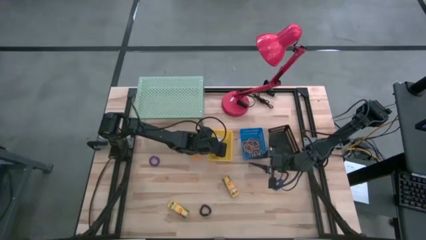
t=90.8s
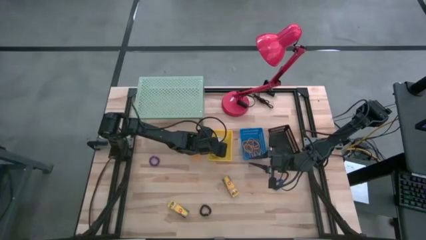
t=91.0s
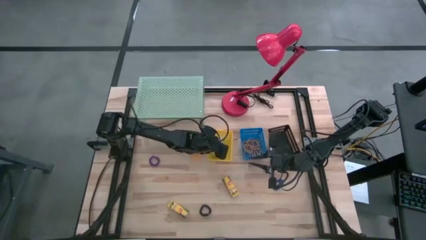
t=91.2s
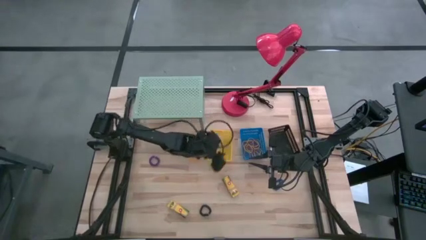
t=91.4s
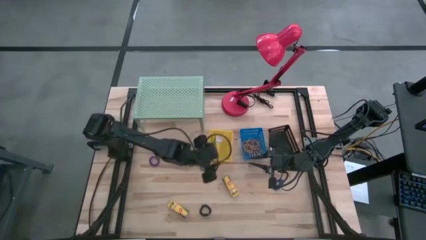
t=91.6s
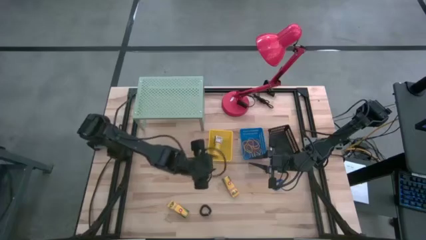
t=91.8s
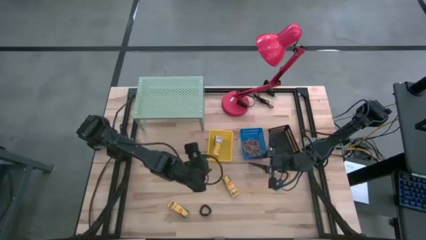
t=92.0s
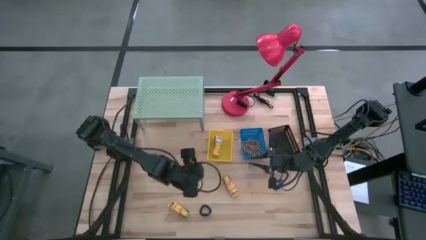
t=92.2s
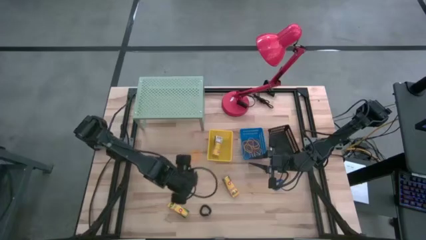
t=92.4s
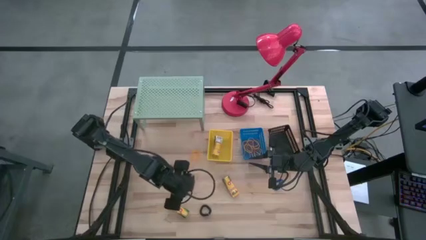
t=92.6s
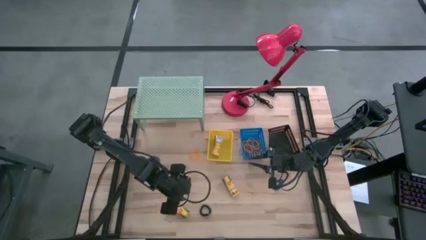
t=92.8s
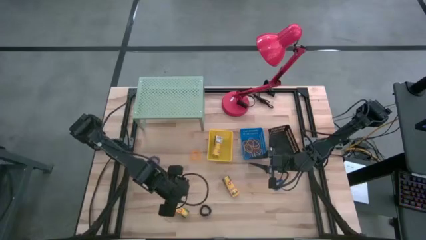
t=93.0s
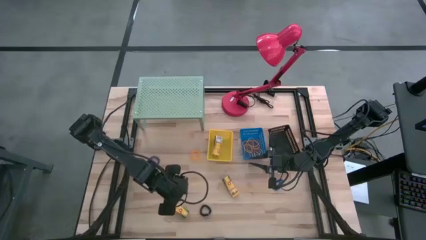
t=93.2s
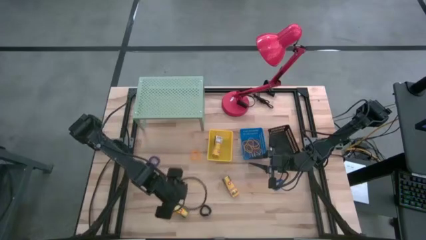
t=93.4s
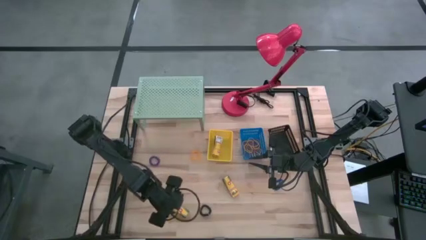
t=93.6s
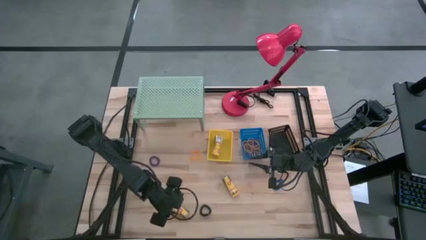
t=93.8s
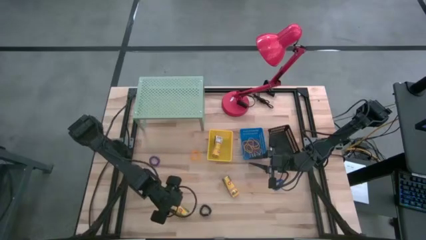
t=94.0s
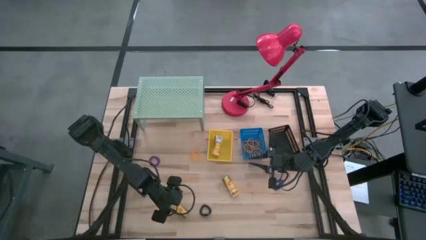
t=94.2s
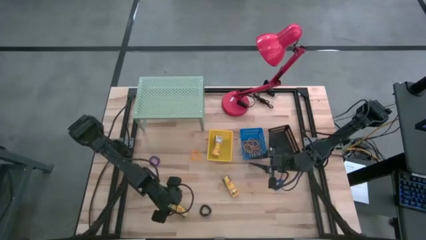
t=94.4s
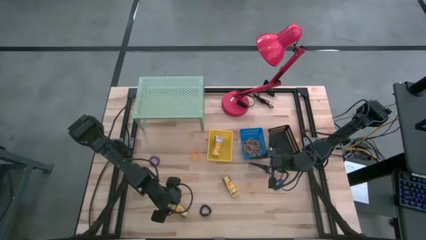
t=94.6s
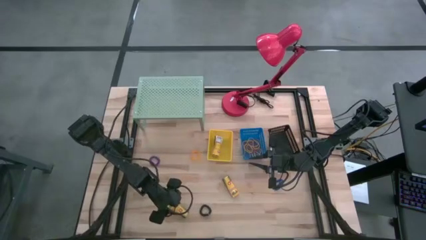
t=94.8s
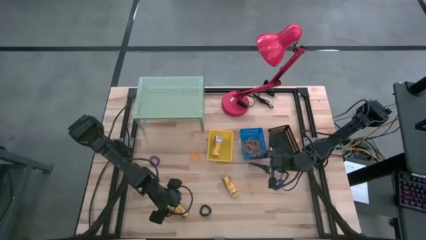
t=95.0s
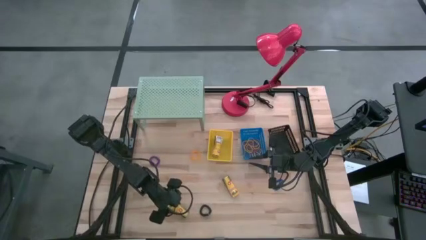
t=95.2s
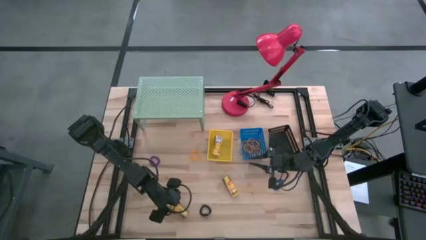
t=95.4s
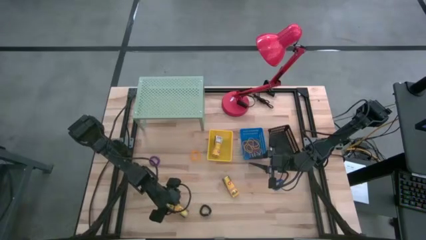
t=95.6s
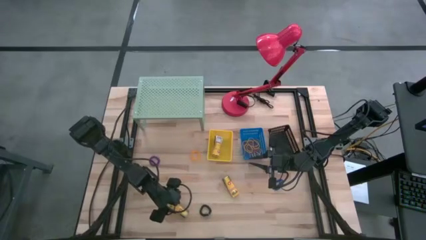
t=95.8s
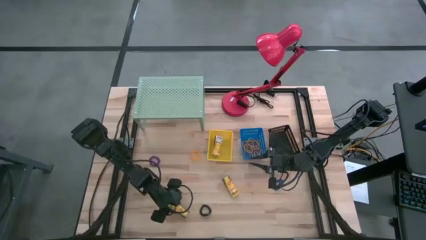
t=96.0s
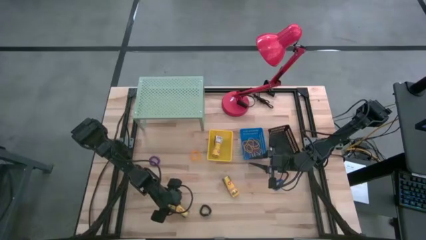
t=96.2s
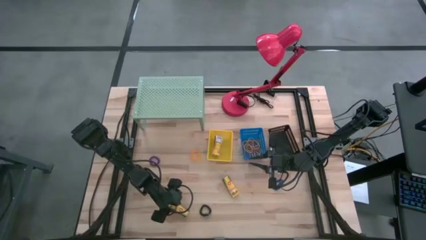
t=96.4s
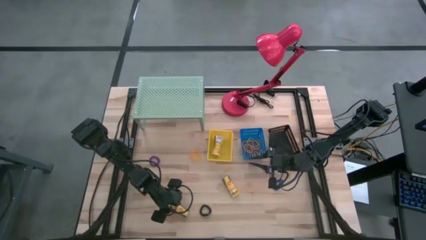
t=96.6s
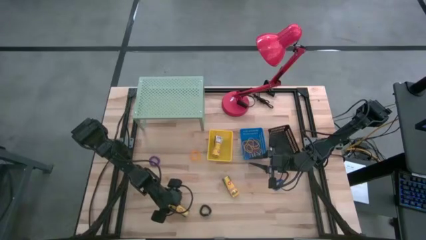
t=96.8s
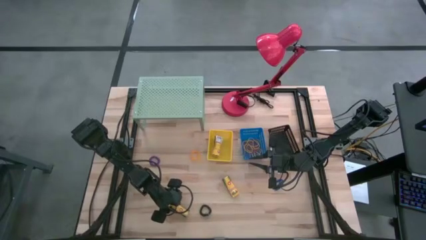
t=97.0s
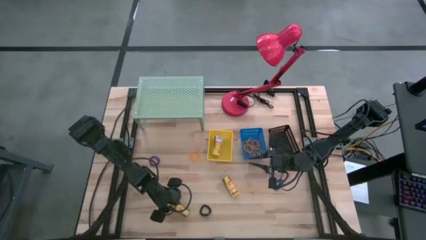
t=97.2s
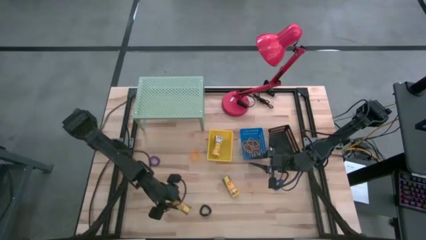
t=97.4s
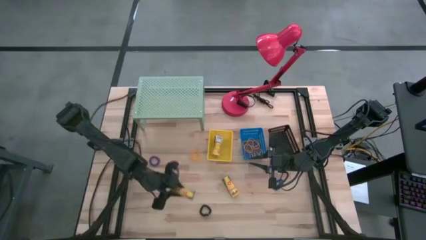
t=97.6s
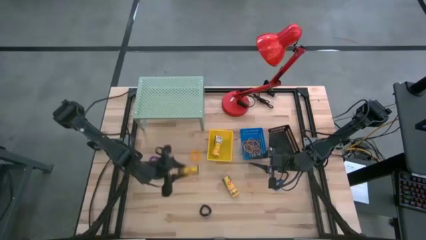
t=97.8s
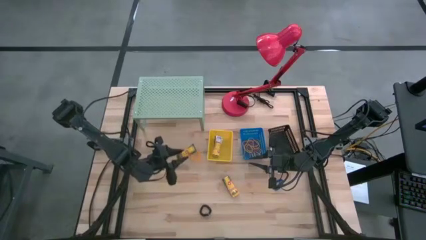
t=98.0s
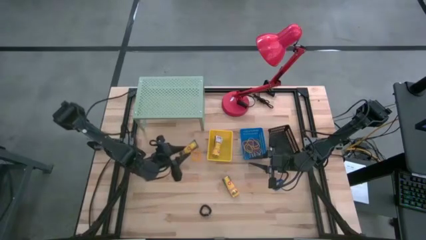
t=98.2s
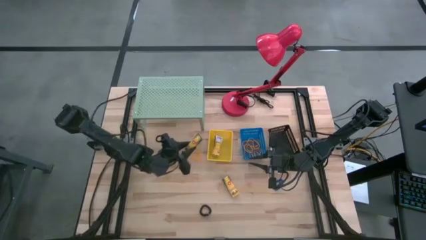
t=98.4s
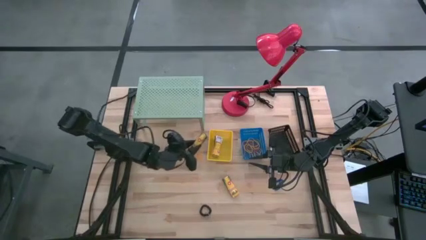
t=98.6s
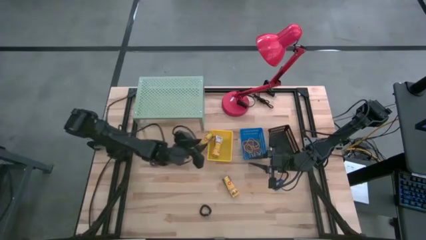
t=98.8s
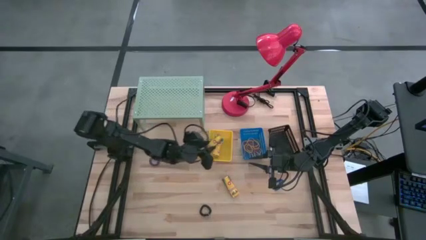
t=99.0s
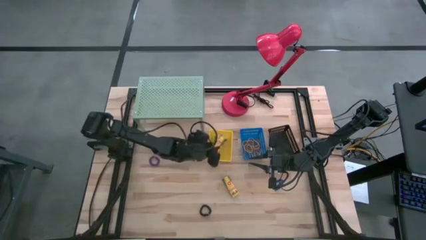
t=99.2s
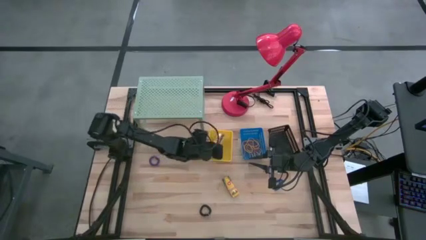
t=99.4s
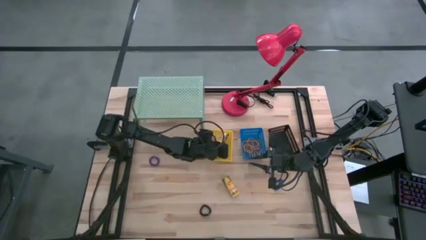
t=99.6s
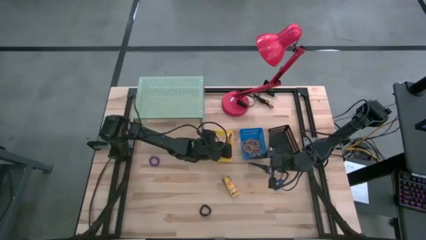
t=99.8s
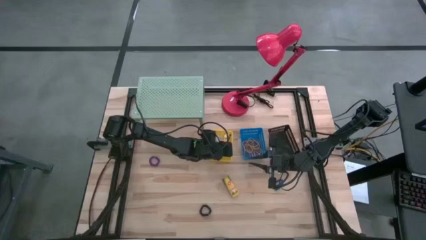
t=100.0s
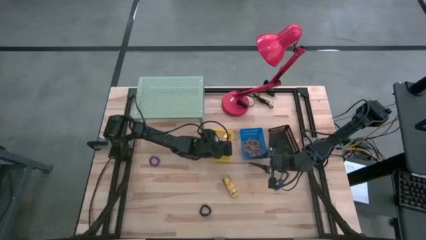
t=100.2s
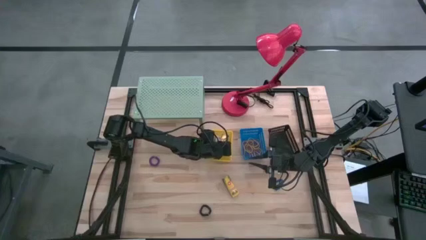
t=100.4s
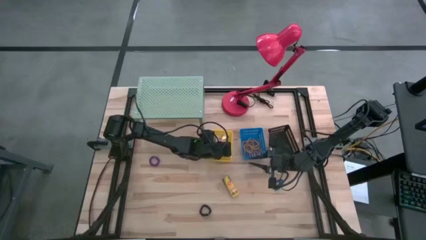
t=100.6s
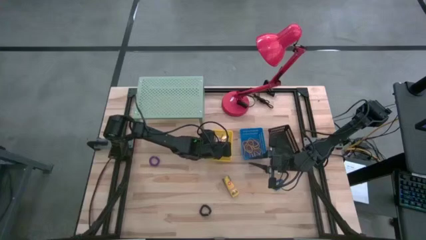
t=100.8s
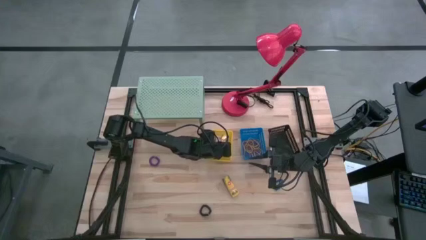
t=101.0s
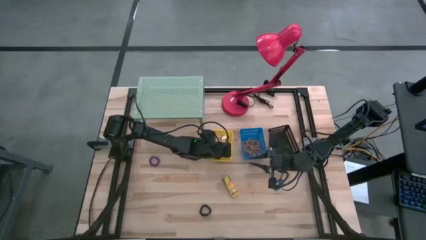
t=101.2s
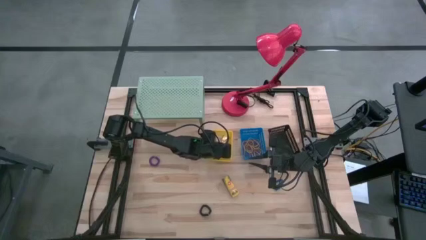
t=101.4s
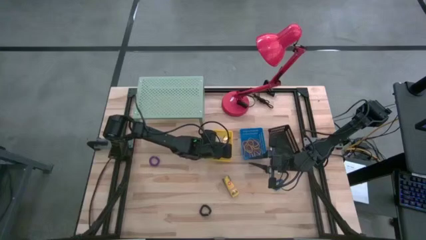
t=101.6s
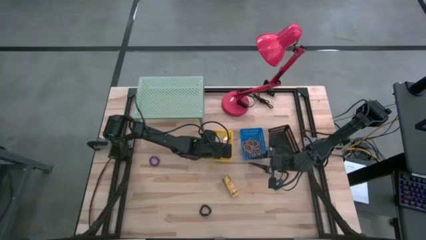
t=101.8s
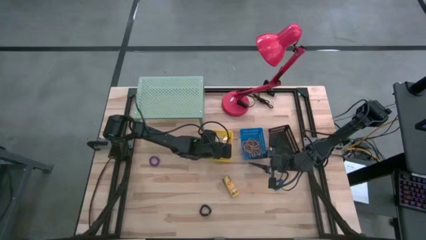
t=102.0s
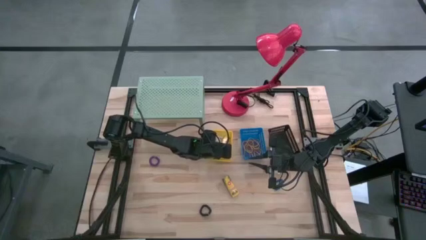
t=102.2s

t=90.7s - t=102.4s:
Task: Pick & Place Office Desk Supplies
Put the bottom center crayon box into the yellow basket

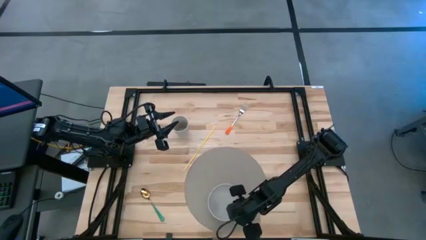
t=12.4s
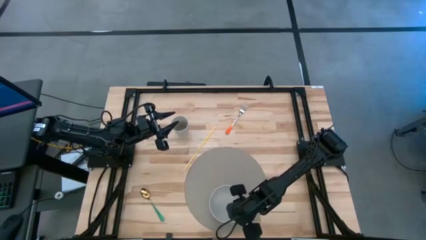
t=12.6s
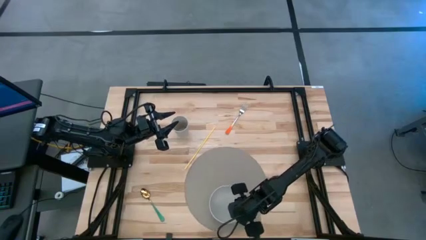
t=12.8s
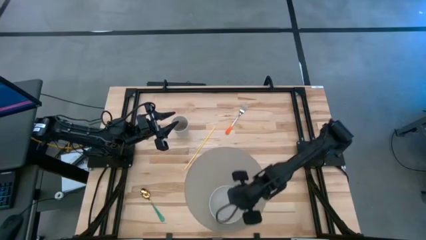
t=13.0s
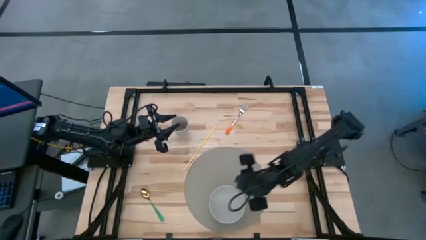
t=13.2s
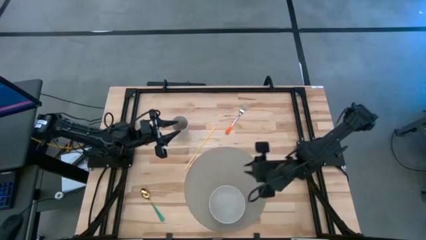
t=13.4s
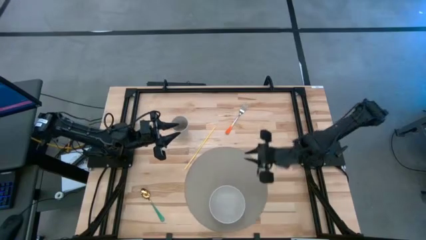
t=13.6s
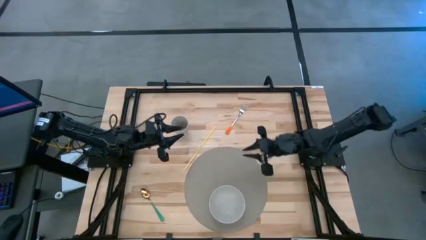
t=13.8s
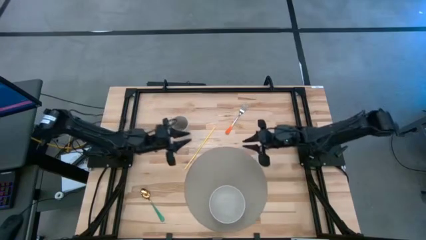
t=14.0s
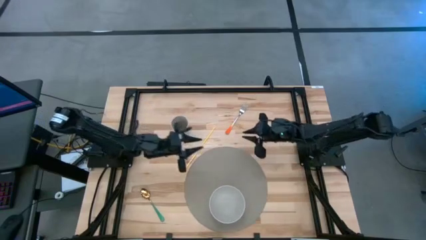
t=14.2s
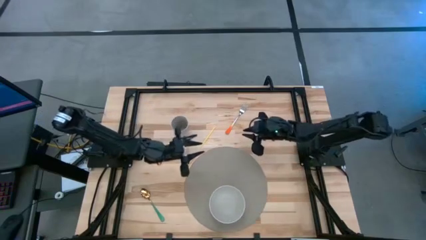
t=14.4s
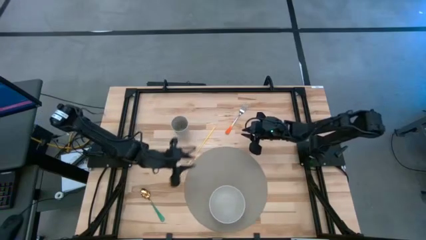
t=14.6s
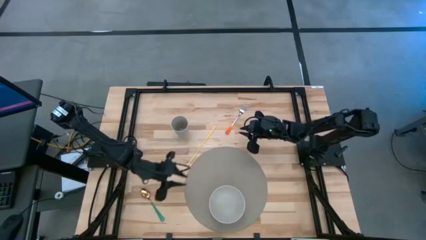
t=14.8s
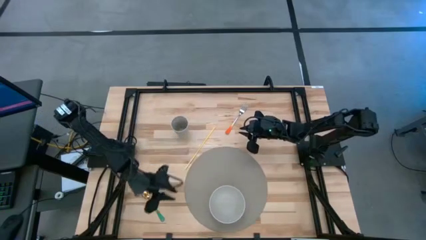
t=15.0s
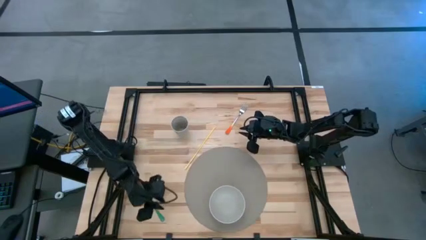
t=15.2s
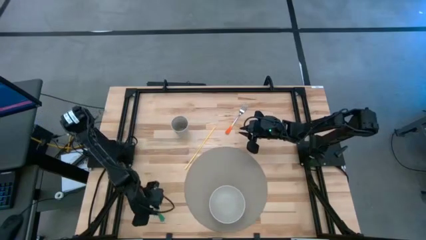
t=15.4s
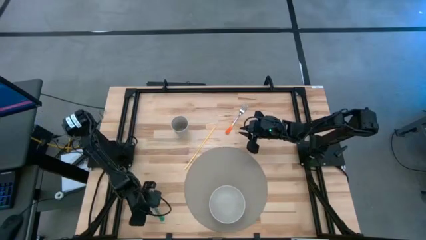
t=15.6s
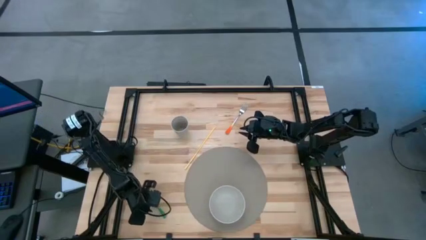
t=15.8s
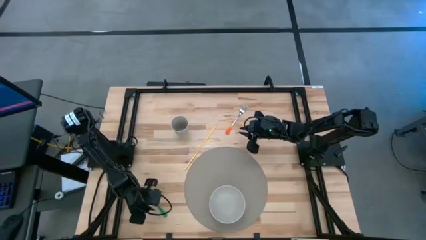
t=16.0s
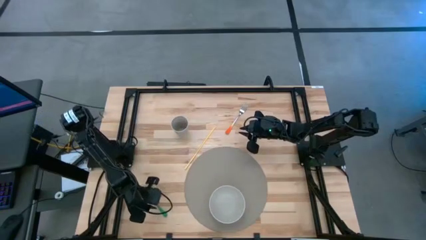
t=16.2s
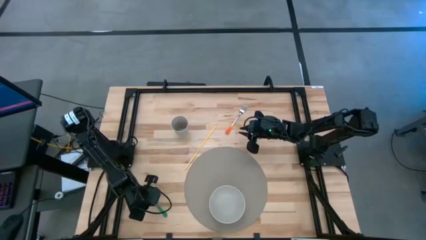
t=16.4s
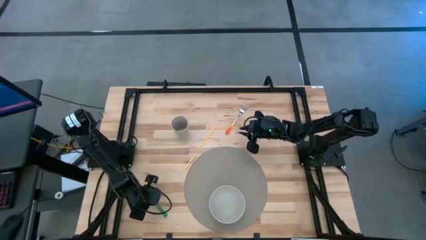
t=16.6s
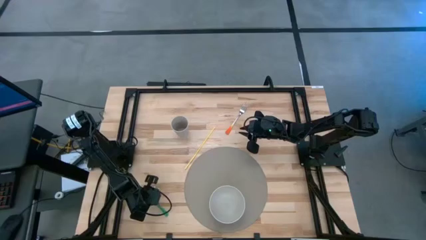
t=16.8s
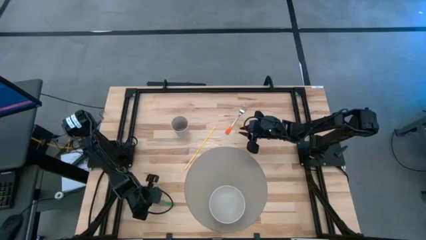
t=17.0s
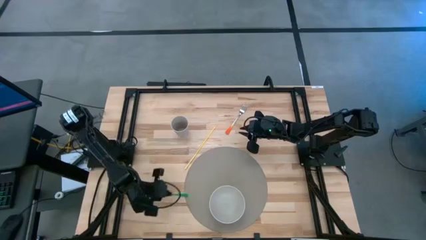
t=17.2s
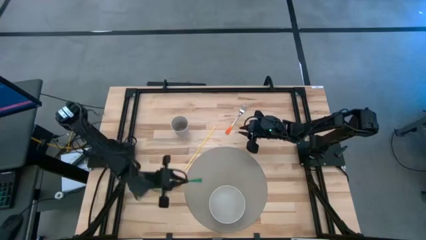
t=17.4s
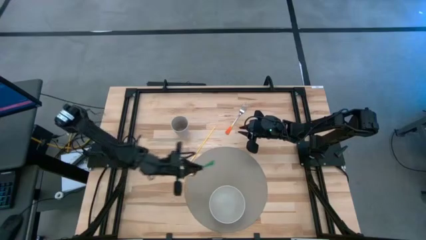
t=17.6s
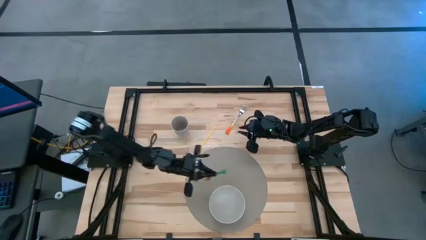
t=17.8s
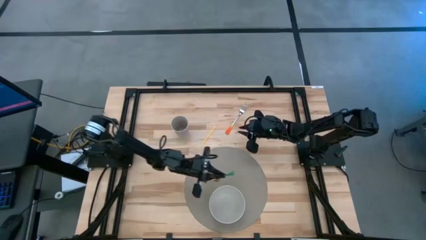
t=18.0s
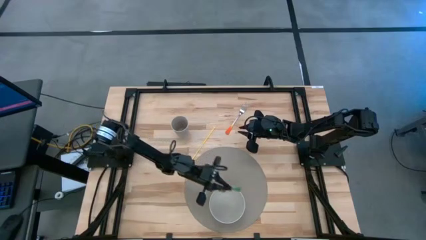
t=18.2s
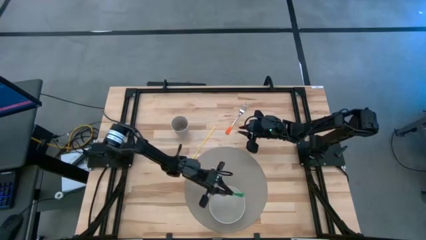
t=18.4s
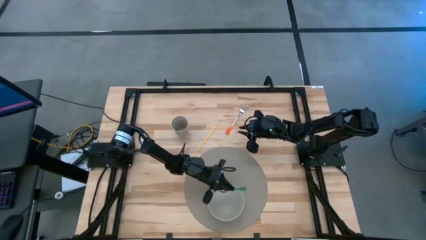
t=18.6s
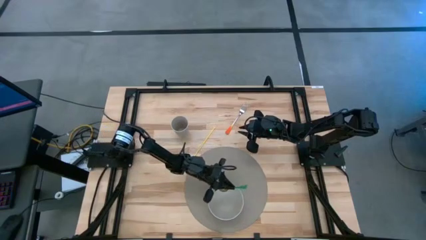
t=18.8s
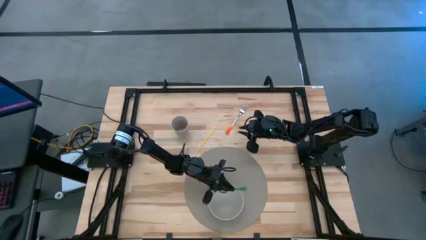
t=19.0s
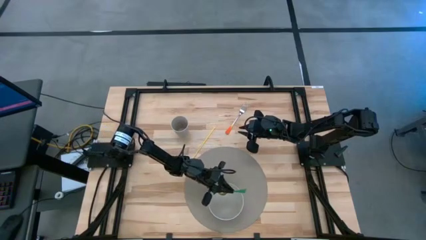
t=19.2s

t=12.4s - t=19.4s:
Task: Pick & Place Utensil
Put the green spoon into the white bowl on the placemat
